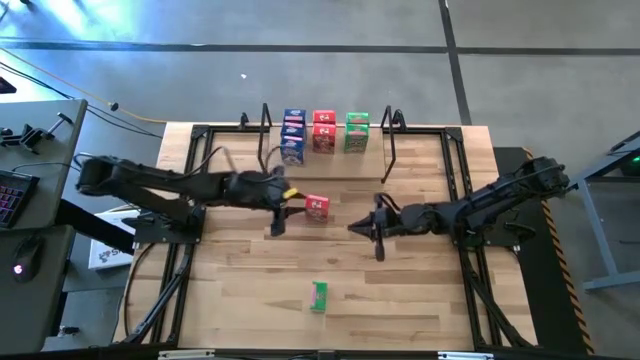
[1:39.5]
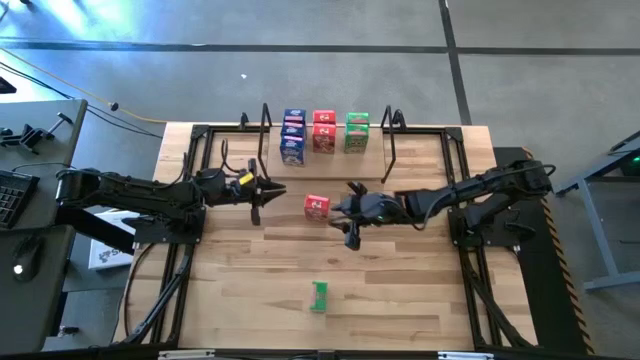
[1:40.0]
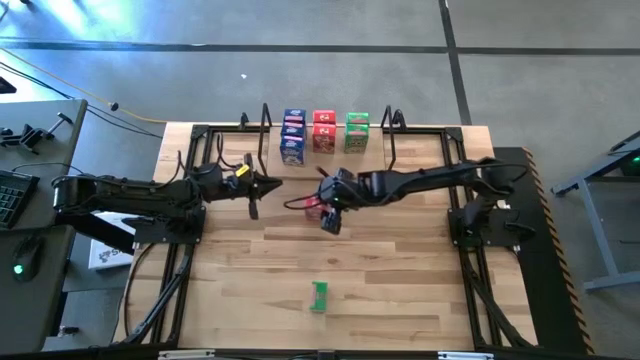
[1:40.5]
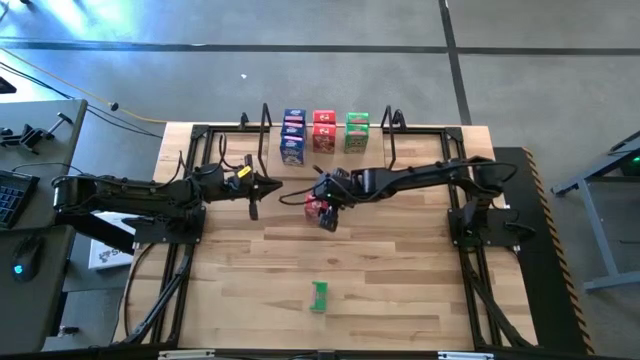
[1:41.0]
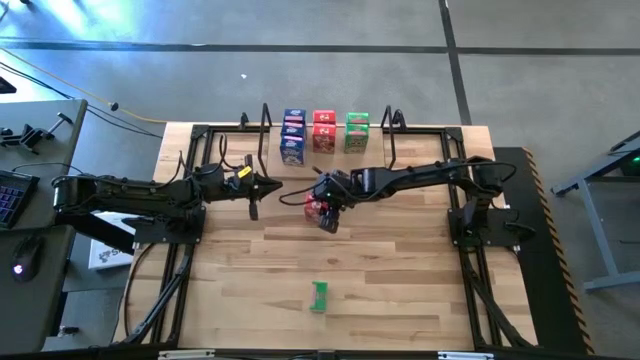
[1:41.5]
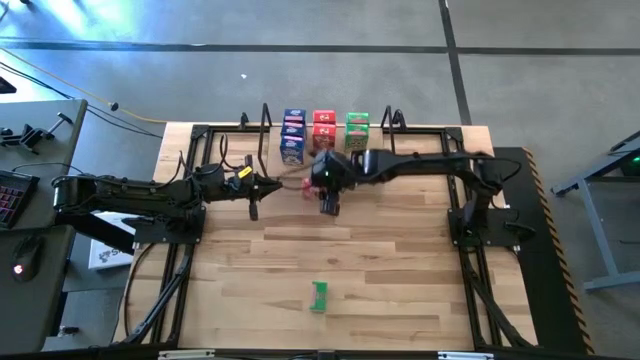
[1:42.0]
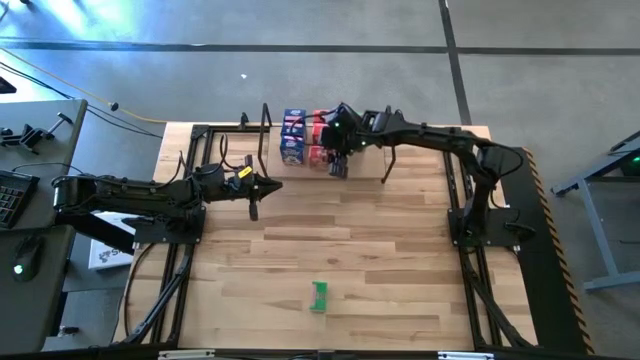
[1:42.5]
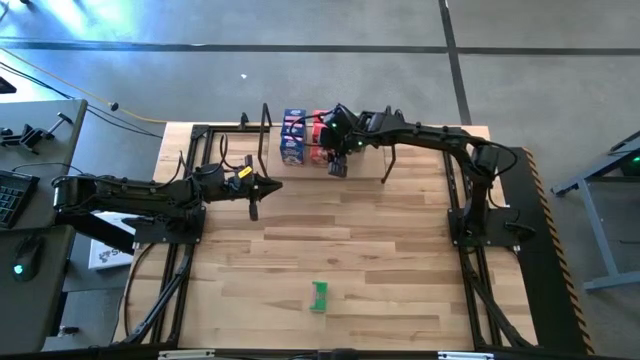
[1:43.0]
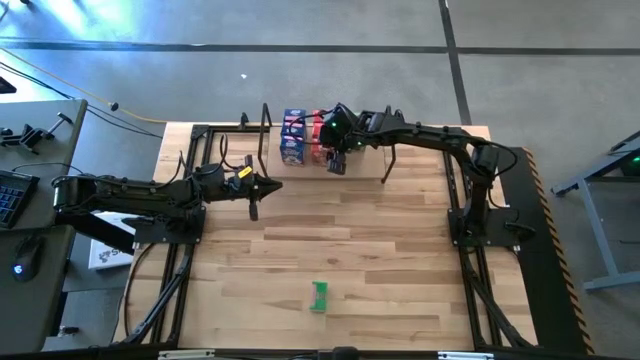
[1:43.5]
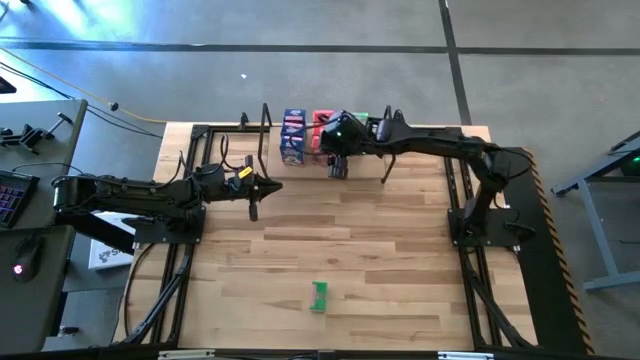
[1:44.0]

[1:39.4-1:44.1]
Task: Stack cereal on shelf
Put the red cereal box on the shelf aligned with the other red cereal box

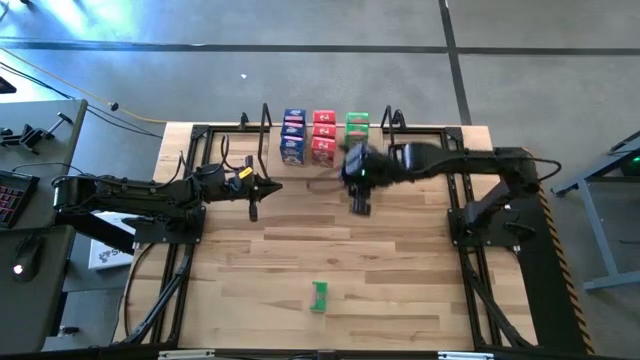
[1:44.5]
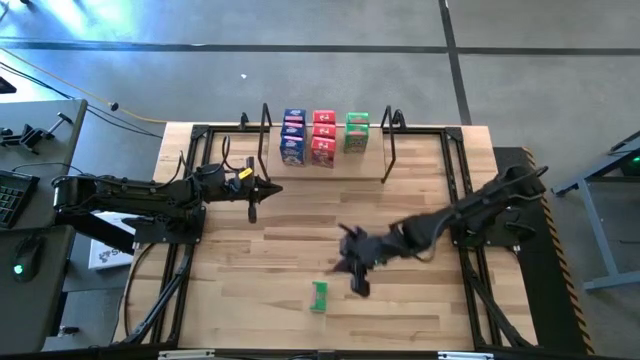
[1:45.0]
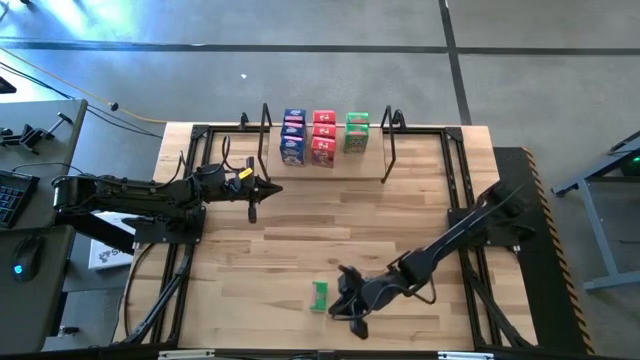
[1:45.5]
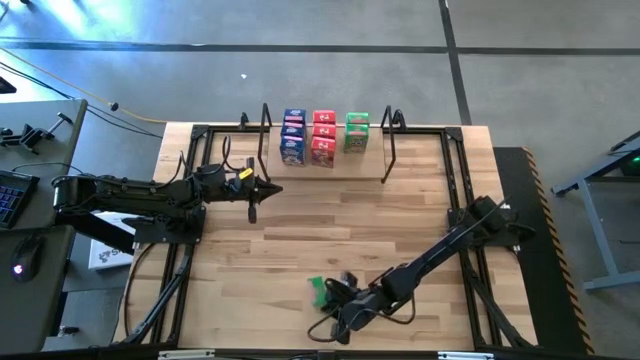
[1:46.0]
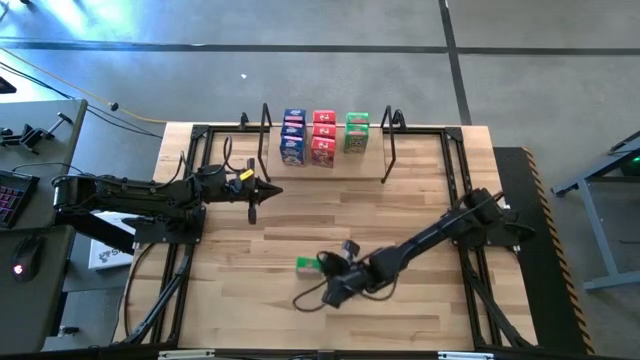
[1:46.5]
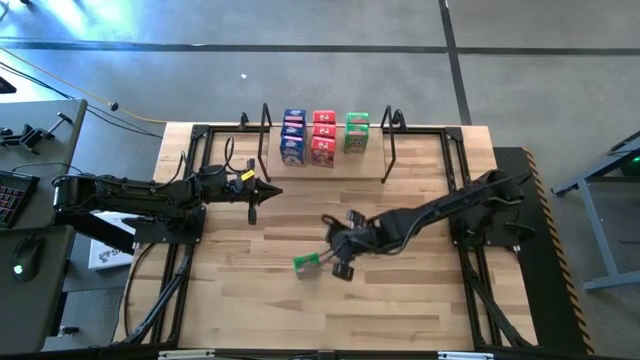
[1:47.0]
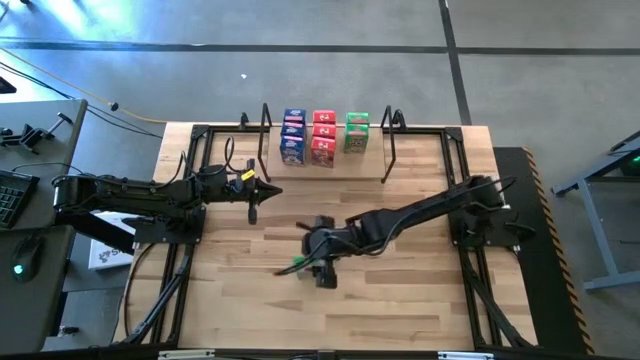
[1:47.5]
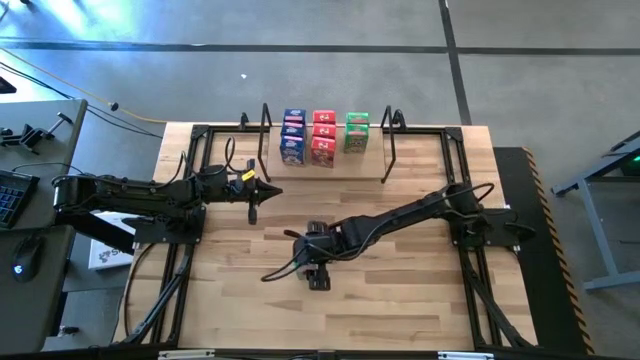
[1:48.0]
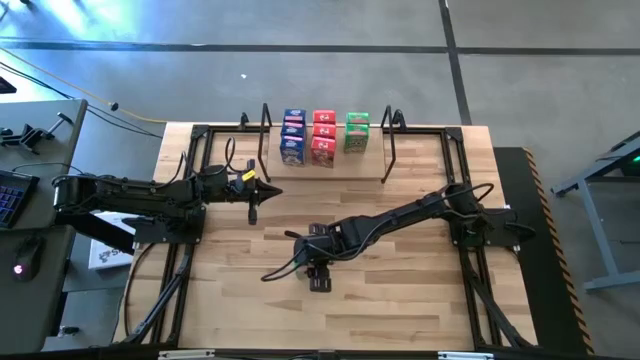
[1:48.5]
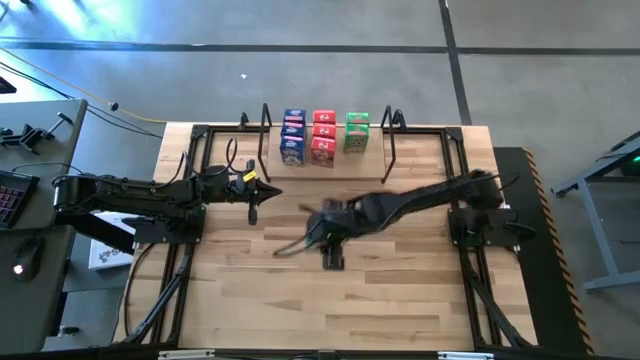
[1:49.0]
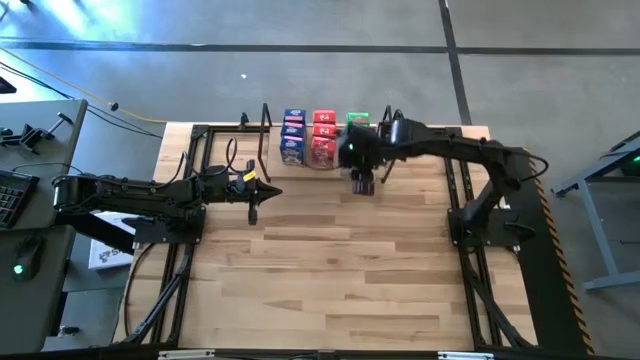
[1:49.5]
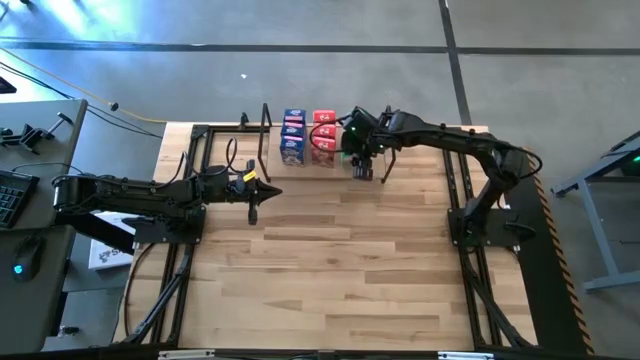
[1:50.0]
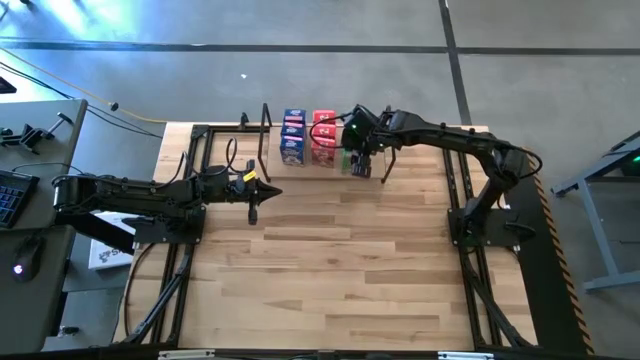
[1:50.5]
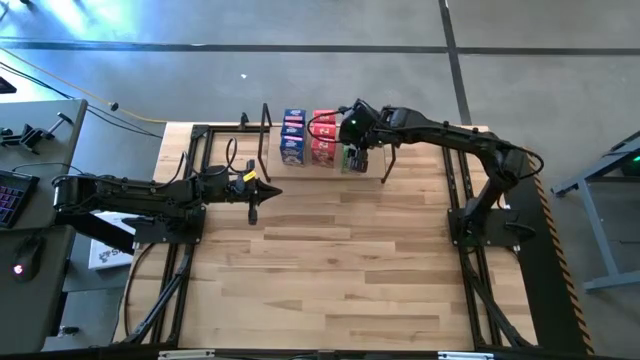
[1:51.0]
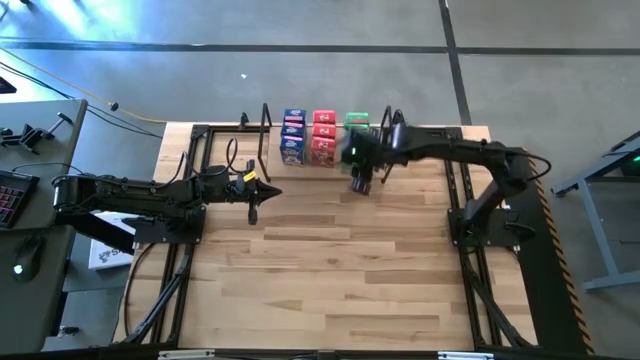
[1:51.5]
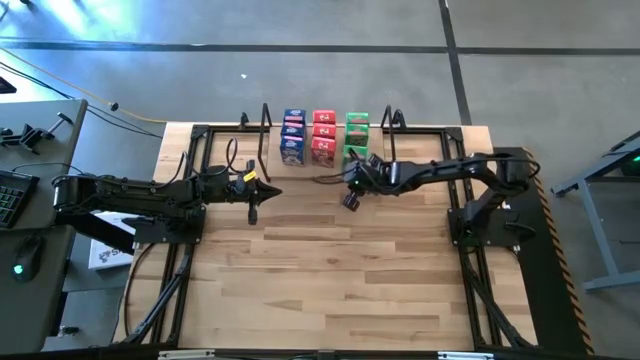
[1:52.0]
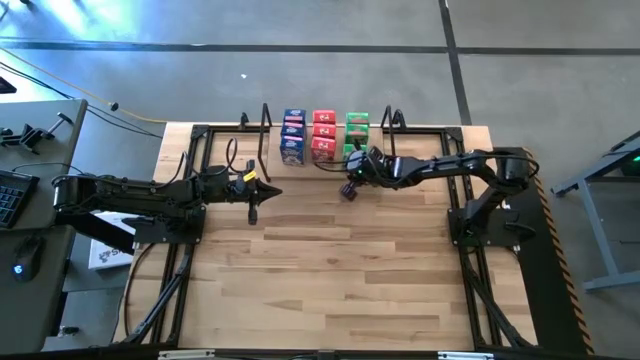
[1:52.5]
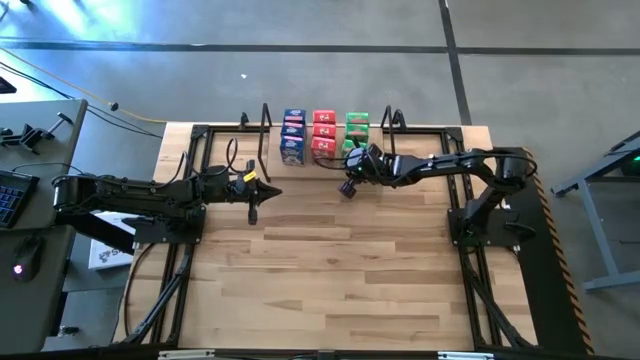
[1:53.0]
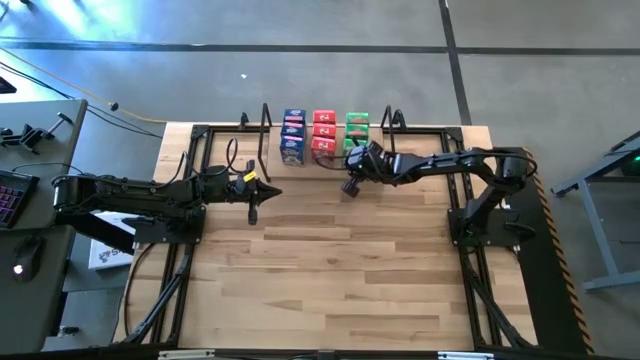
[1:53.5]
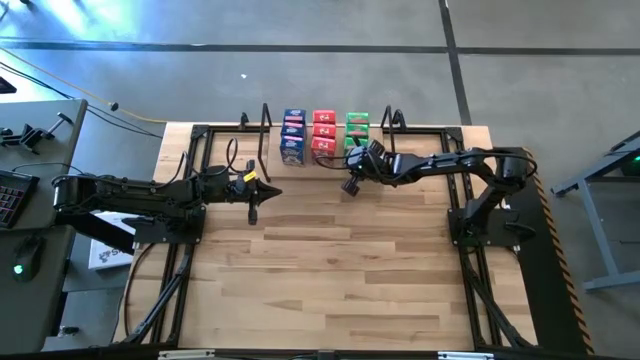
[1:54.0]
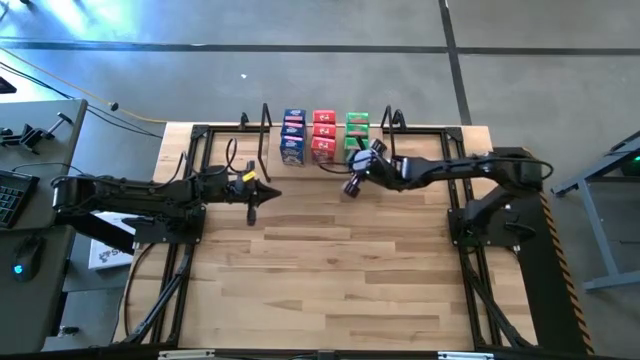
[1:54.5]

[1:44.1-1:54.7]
Put the green cereal box on the shelf aligned with the other green cereal box

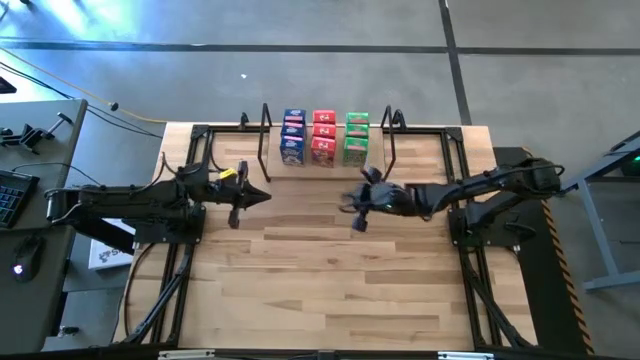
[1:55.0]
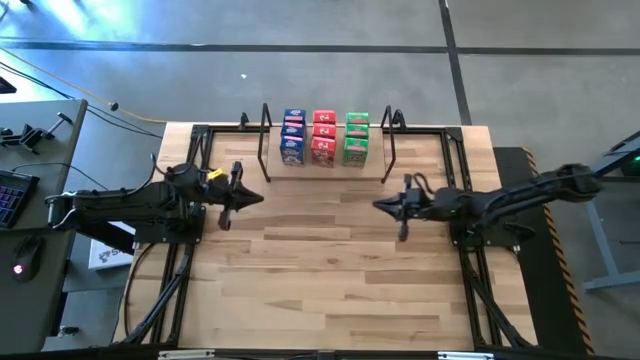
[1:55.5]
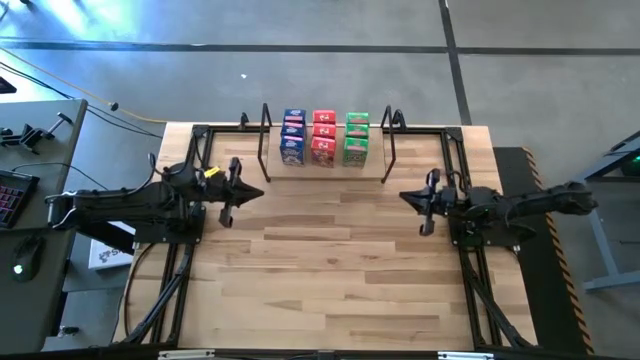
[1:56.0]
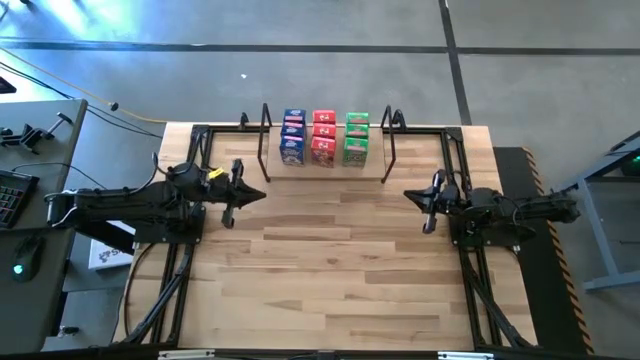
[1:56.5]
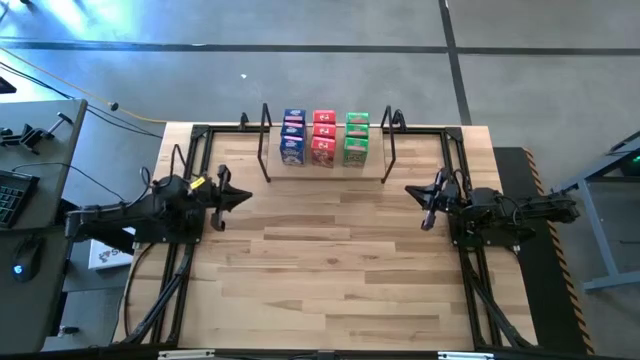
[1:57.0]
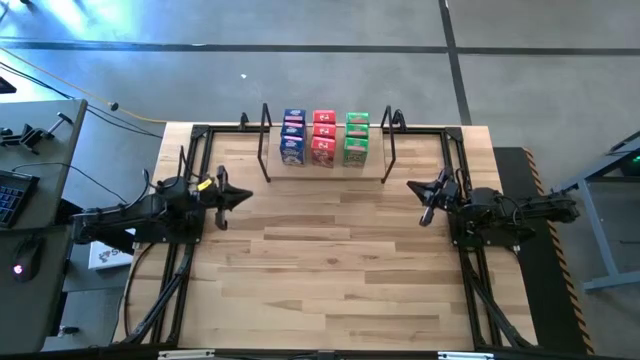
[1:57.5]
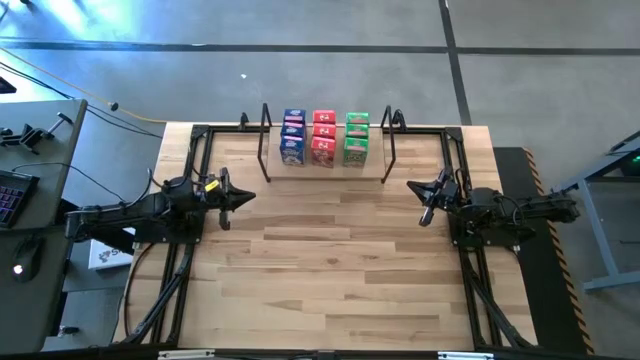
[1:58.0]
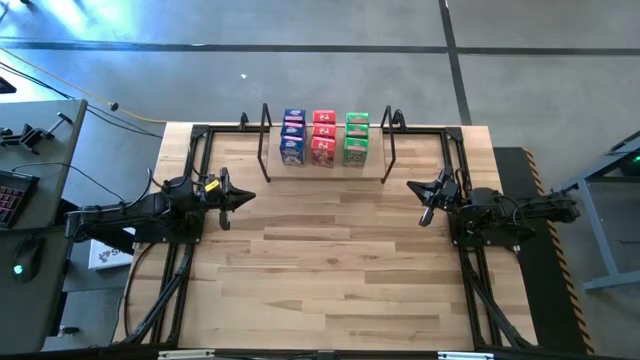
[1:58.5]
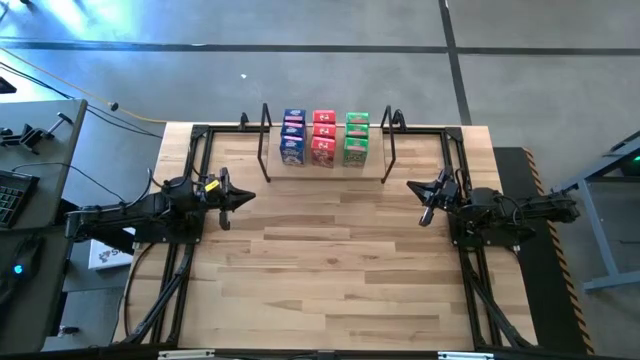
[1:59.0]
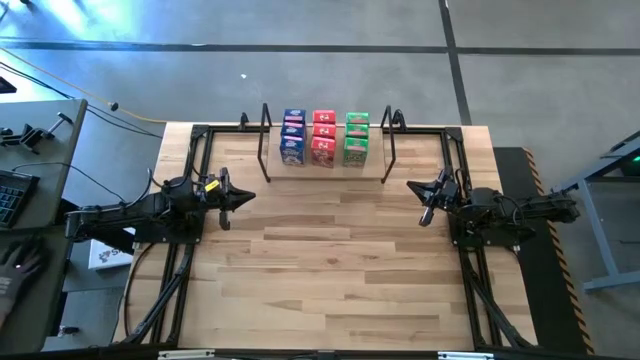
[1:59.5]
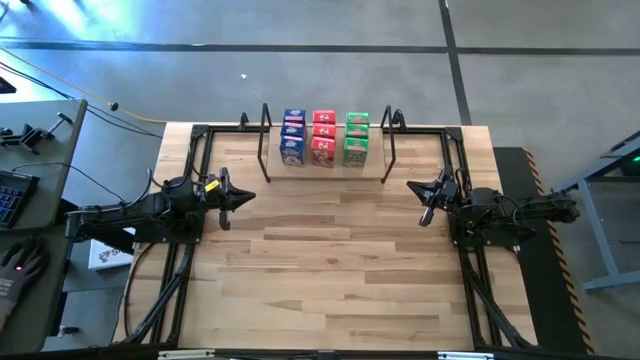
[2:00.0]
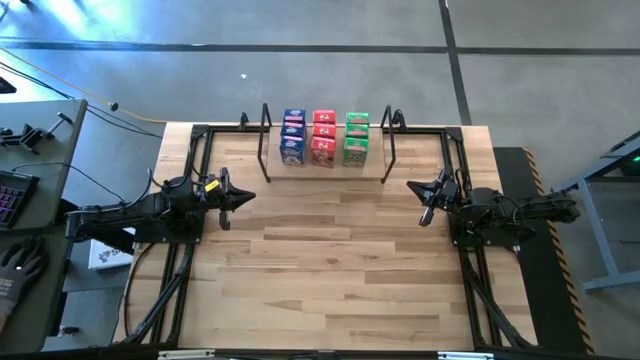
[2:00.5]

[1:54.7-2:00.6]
Return to Home Position
